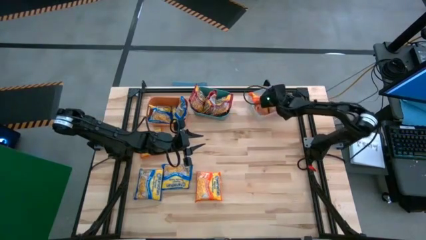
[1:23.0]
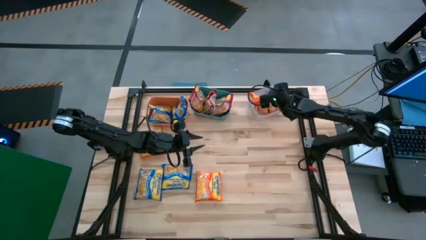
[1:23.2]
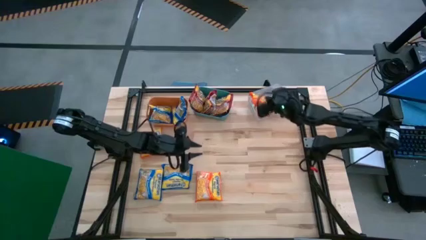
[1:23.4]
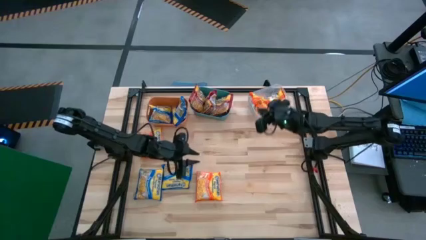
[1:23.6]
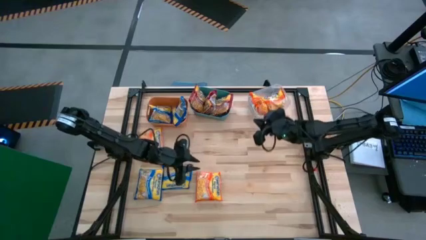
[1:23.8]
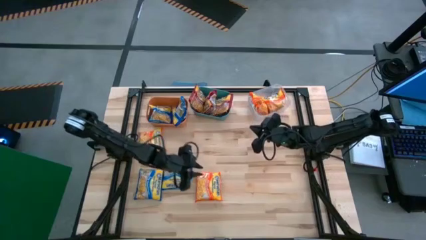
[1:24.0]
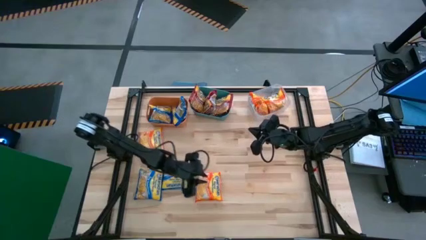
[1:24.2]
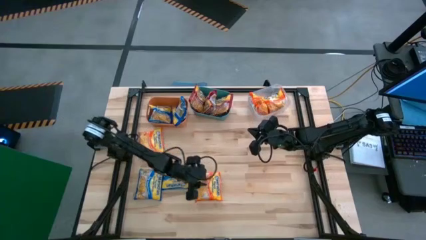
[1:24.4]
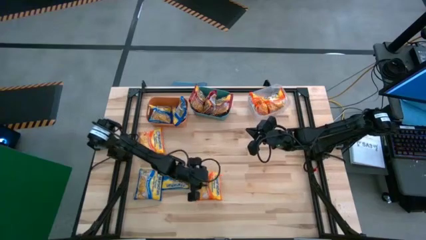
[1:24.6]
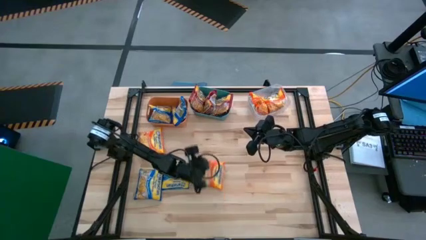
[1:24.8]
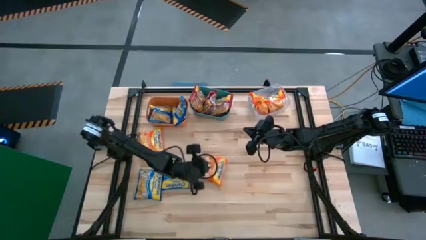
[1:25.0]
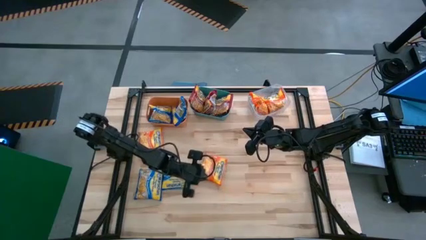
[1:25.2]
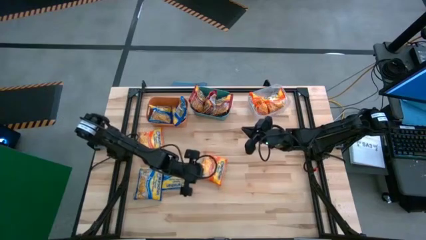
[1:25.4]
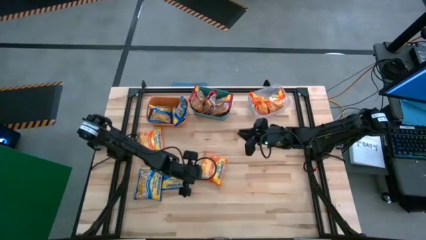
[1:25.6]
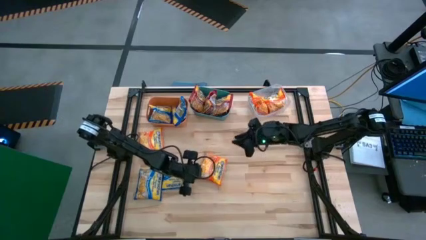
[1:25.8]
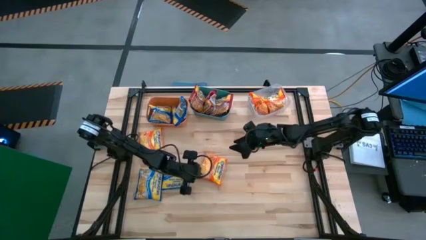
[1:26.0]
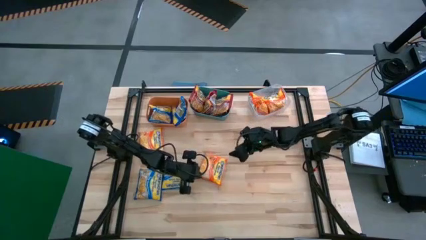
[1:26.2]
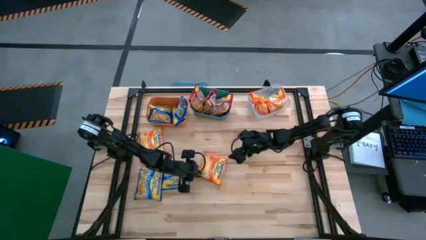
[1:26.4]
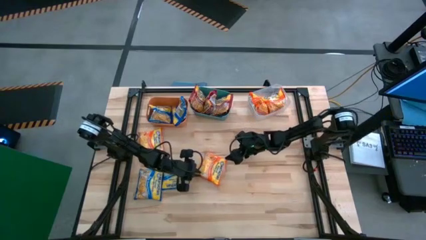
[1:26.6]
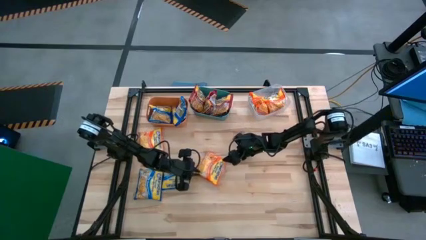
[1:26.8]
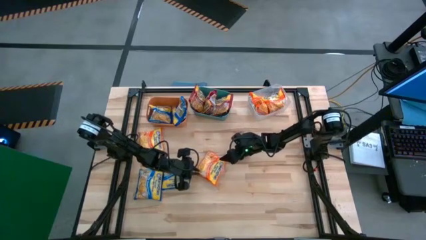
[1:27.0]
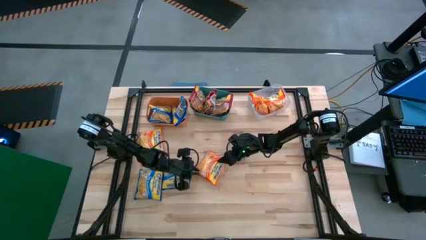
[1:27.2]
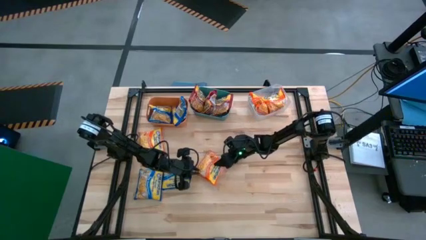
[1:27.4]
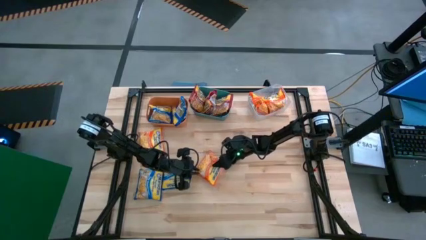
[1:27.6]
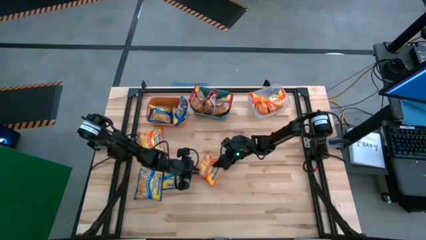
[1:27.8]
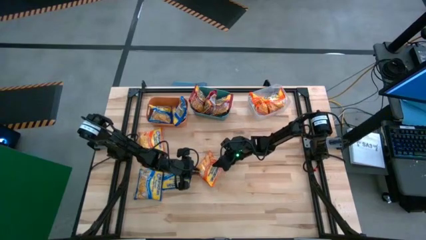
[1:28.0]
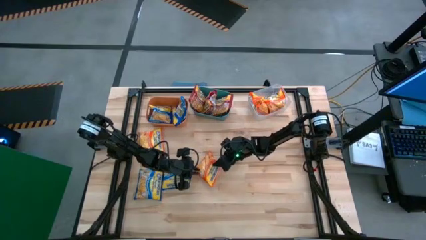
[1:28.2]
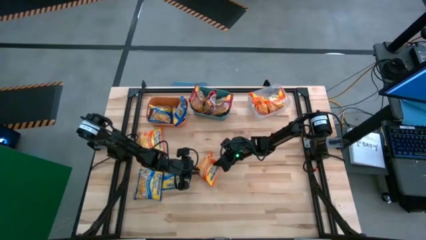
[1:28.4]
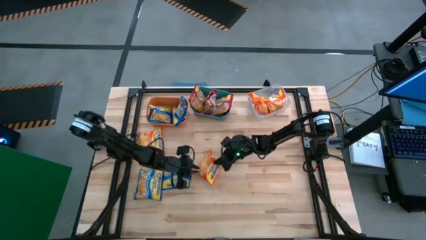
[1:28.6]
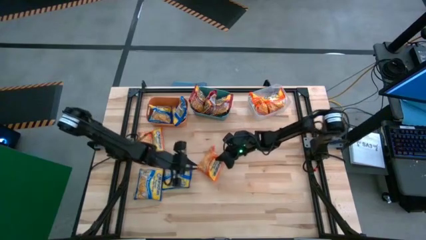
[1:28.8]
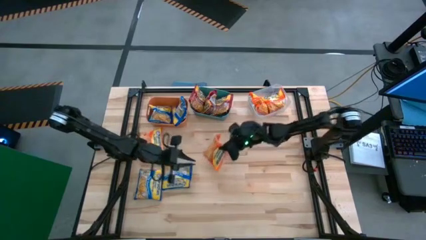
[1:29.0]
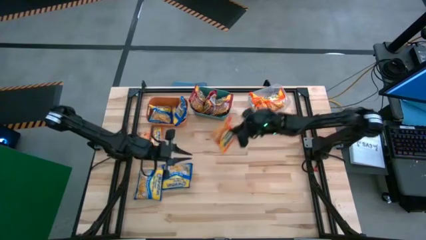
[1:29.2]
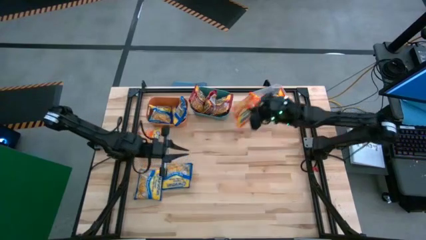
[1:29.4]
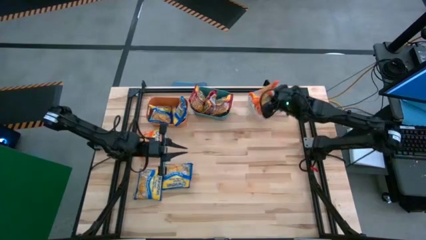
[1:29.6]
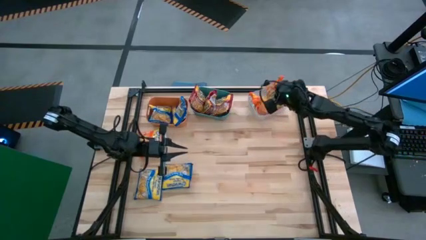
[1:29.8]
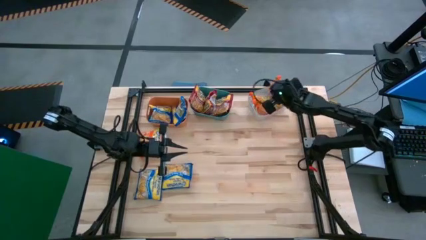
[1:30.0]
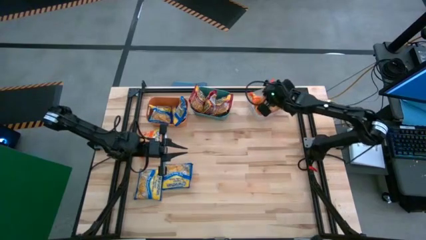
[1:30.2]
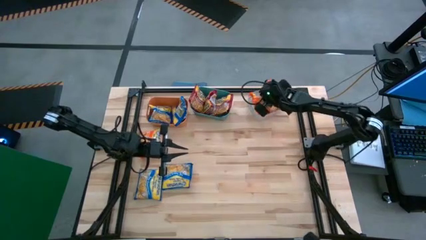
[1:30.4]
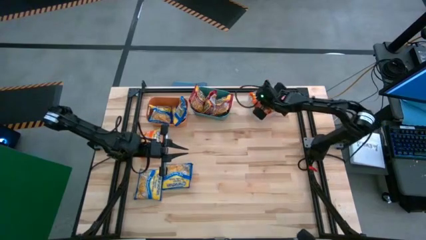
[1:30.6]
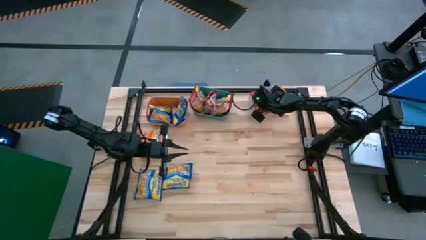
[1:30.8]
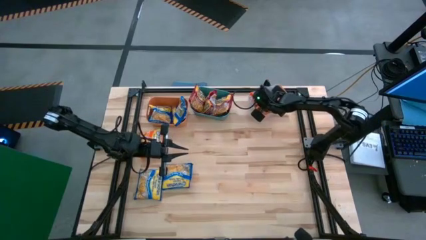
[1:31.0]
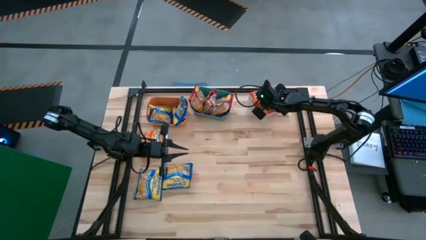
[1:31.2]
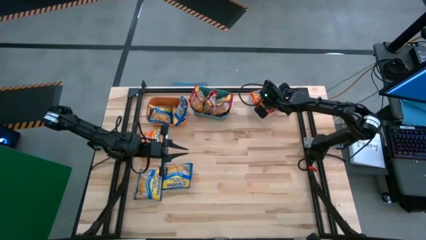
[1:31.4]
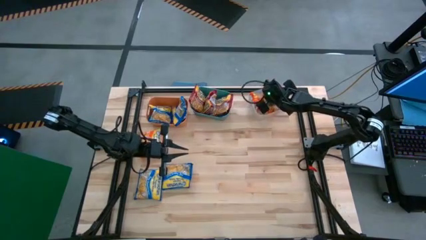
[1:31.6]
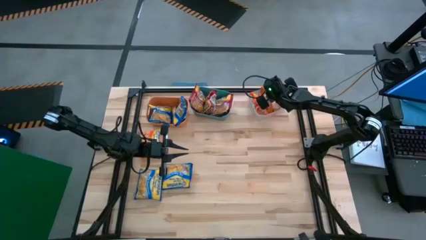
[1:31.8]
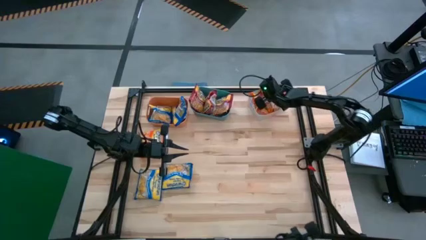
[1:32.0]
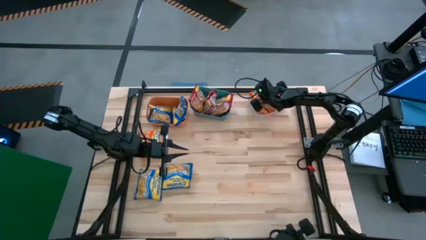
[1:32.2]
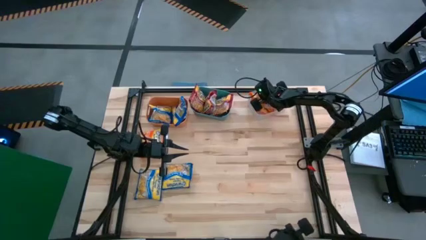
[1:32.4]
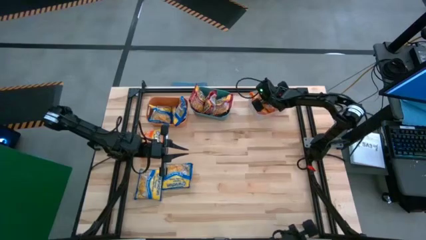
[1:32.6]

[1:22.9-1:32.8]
Task: Sort Maruchan noodles
Put the orange noodle pack into the transparent bin

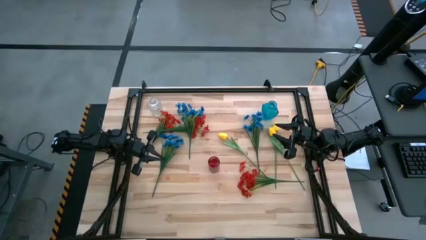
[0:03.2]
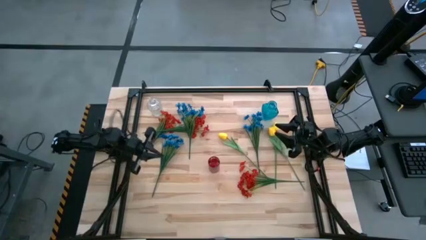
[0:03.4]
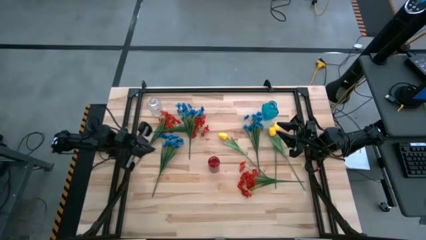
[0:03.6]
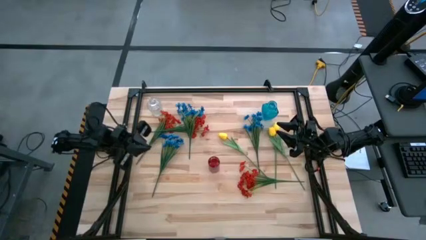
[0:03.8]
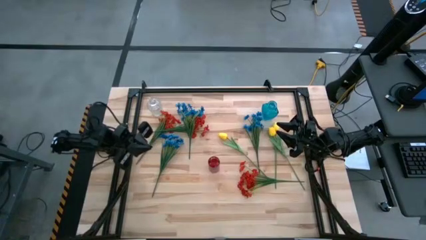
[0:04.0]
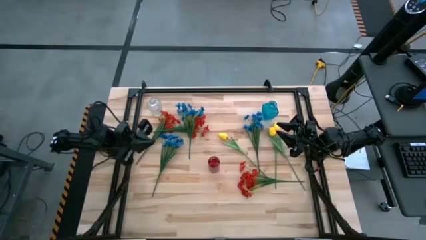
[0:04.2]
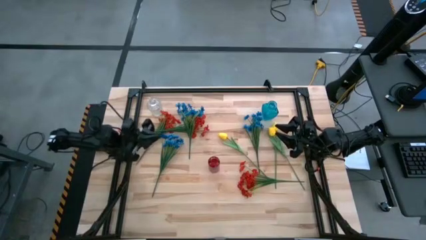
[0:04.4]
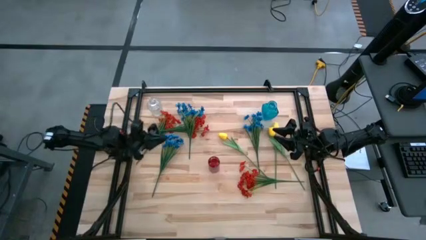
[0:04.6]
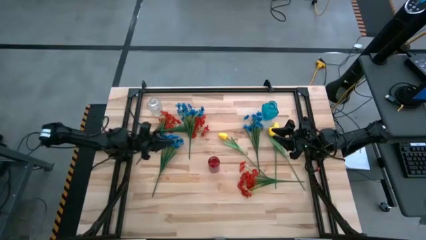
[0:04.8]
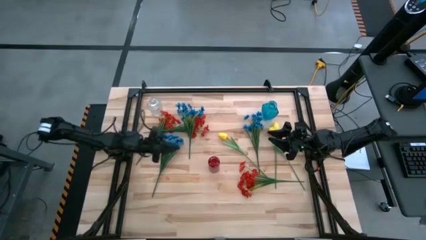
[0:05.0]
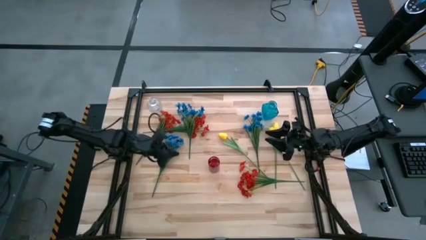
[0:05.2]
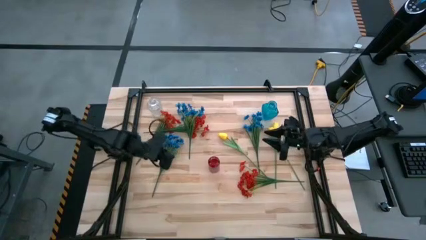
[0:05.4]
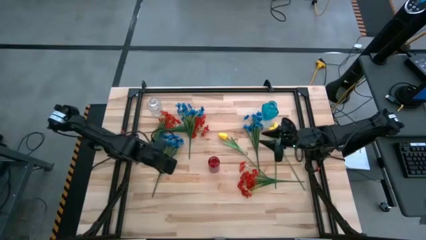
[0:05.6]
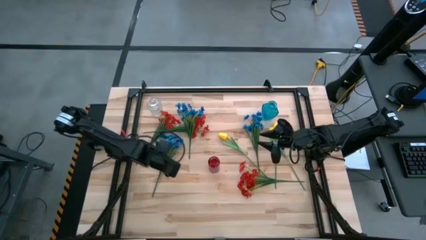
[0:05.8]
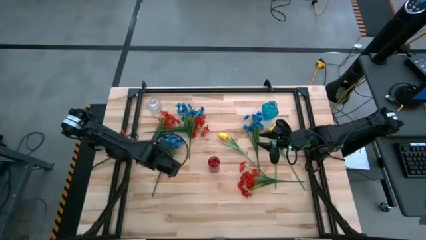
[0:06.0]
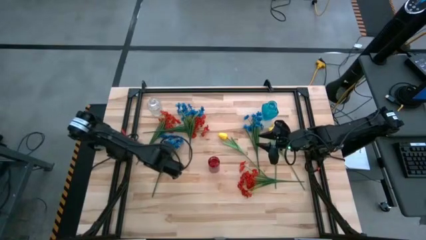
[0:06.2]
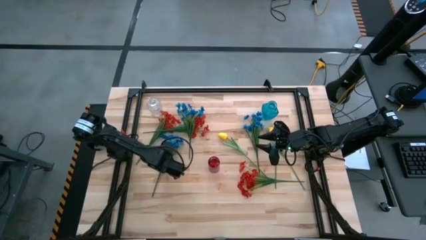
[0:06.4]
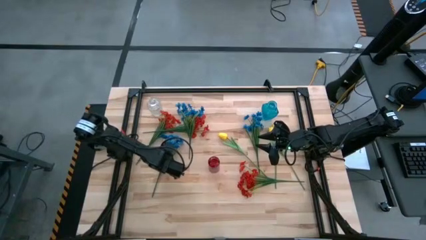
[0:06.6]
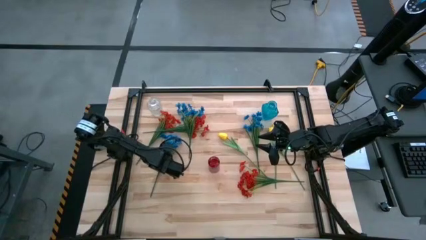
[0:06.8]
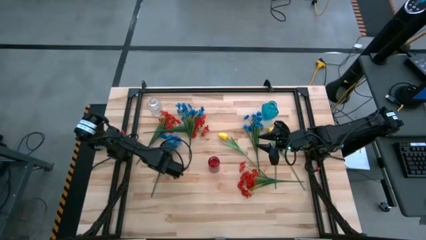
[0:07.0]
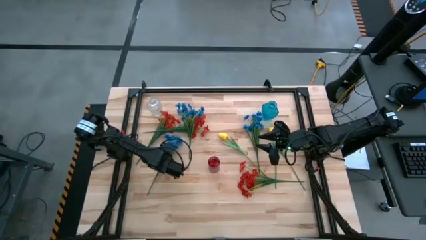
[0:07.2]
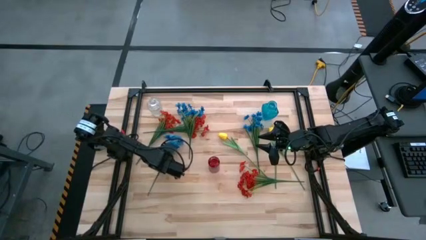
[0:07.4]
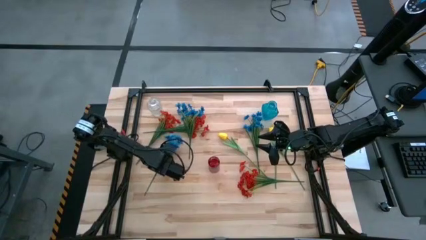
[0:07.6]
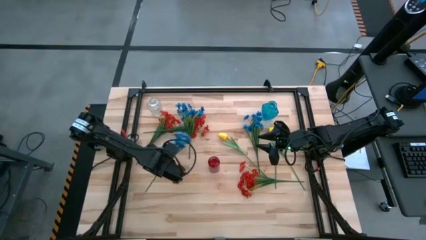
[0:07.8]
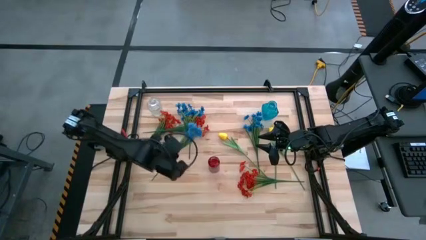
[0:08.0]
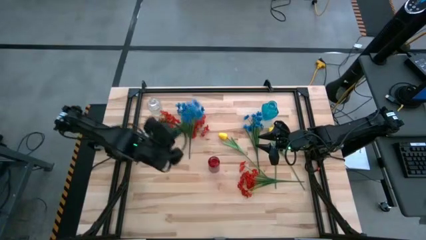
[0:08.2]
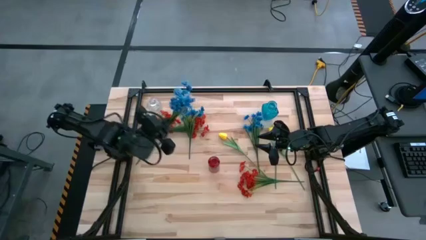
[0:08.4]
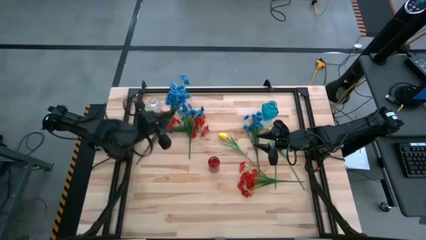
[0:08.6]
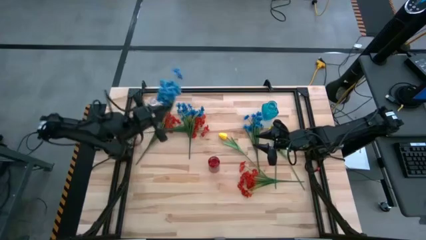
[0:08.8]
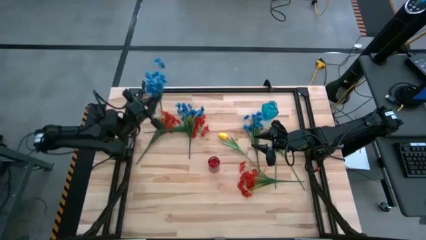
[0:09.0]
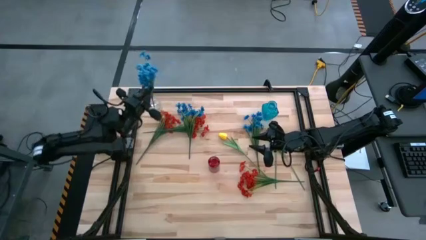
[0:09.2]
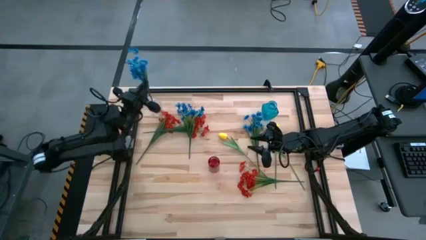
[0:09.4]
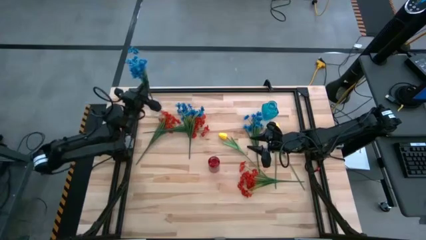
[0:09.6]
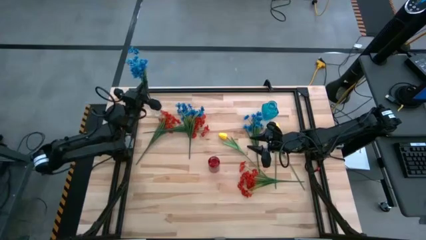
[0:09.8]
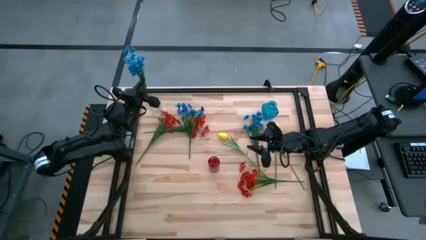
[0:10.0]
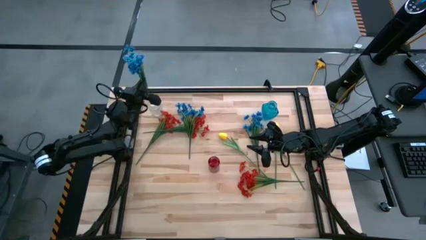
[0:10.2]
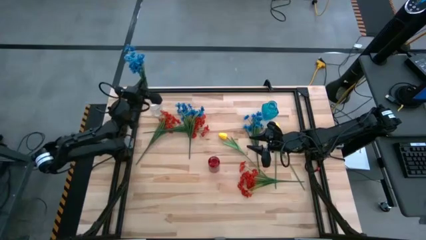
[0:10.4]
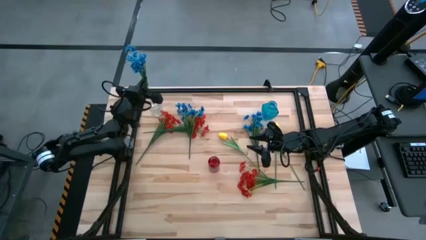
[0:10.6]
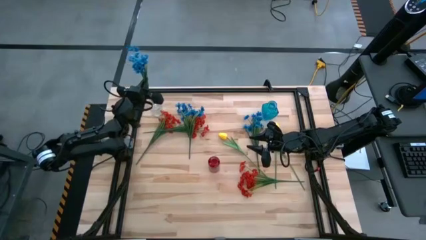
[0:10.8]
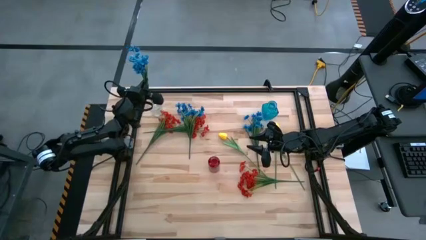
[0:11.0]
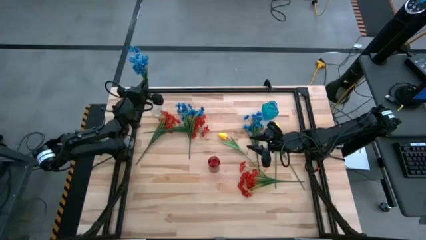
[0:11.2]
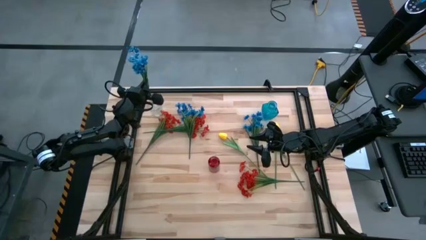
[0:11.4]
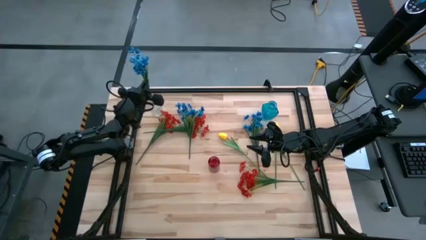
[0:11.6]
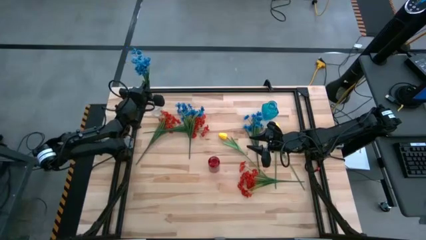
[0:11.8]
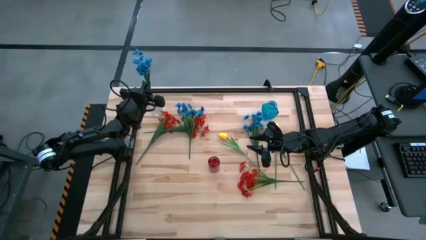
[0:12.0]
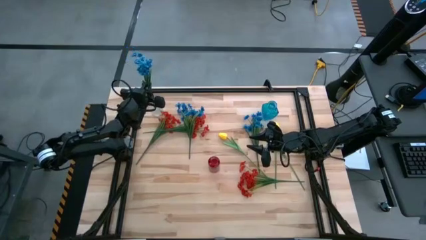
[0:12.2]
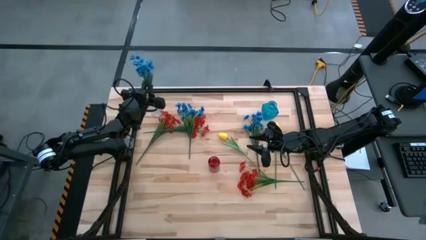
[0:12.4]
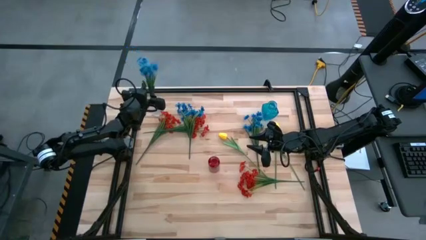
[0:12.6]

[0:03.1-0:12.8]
Task: Sort flowers into vase by color
Put the bottom blue flowers into the transparent vase
